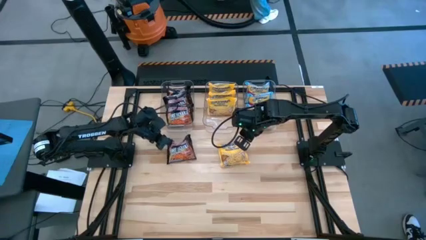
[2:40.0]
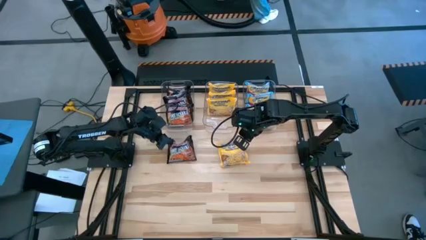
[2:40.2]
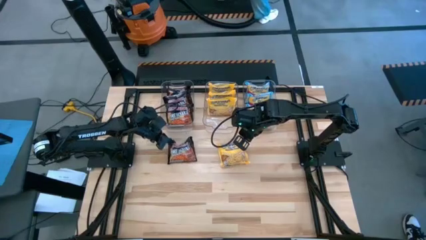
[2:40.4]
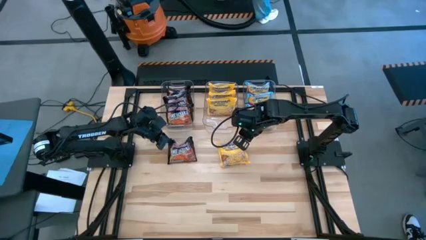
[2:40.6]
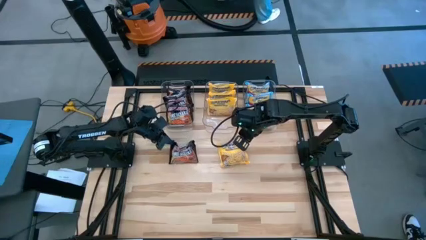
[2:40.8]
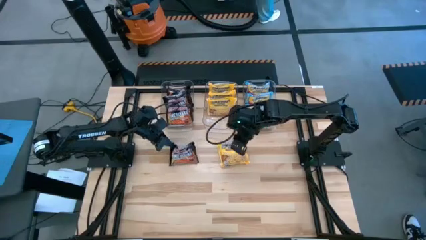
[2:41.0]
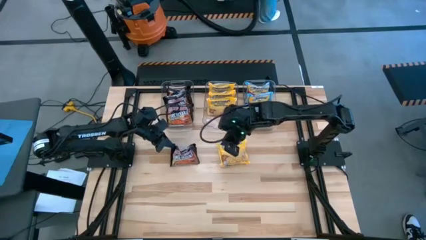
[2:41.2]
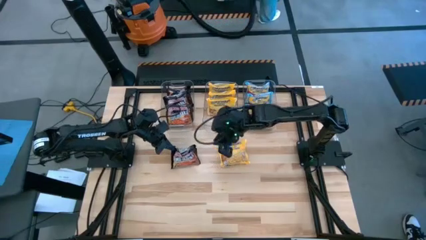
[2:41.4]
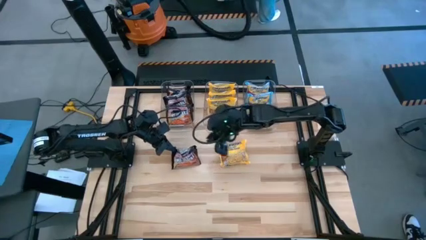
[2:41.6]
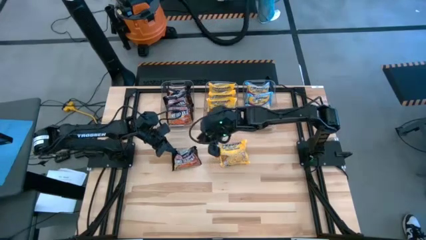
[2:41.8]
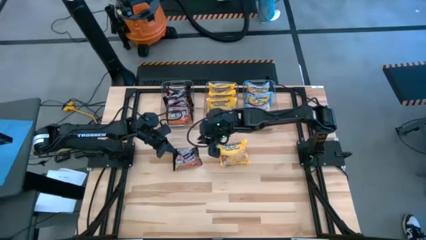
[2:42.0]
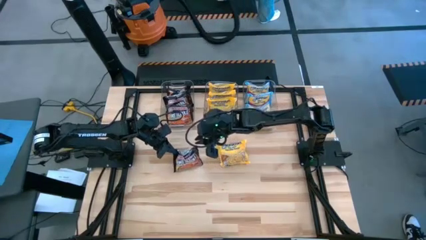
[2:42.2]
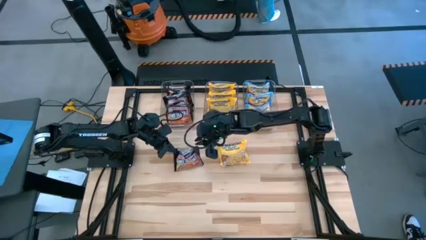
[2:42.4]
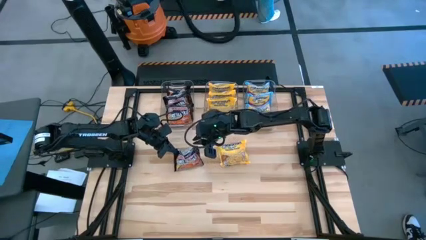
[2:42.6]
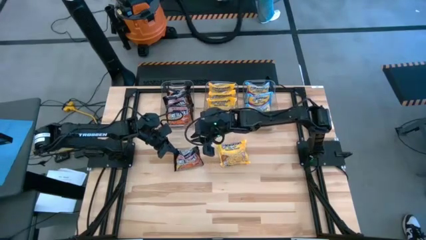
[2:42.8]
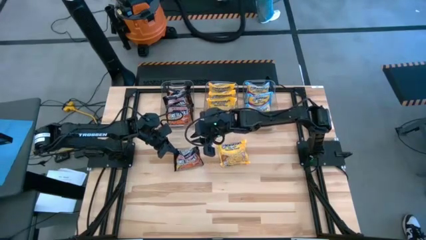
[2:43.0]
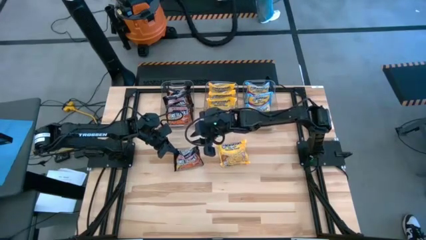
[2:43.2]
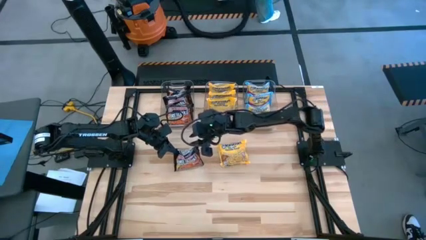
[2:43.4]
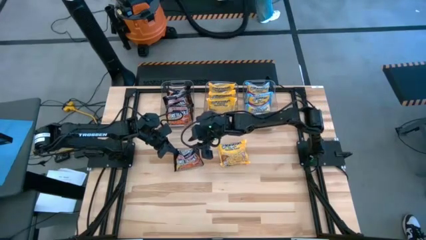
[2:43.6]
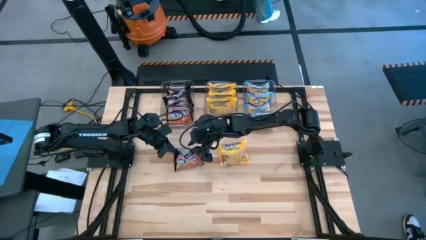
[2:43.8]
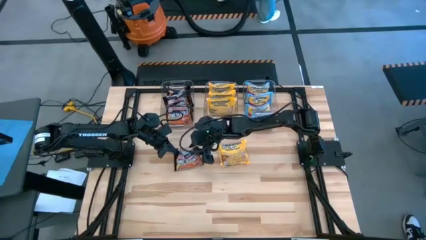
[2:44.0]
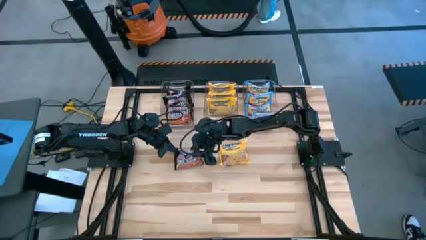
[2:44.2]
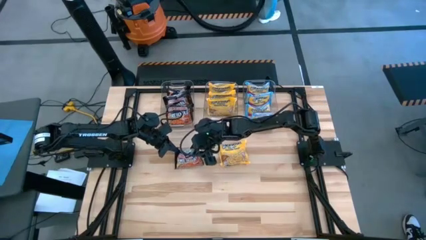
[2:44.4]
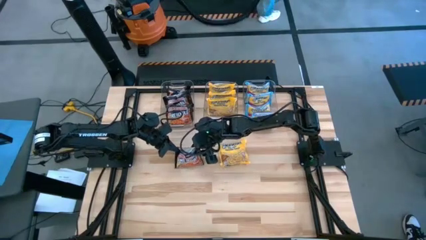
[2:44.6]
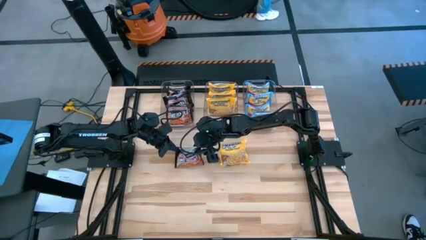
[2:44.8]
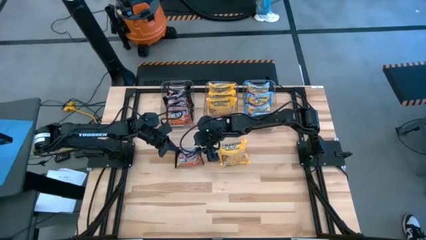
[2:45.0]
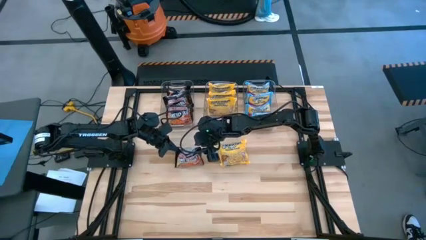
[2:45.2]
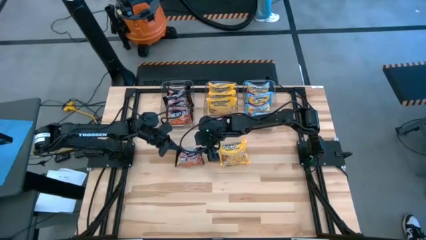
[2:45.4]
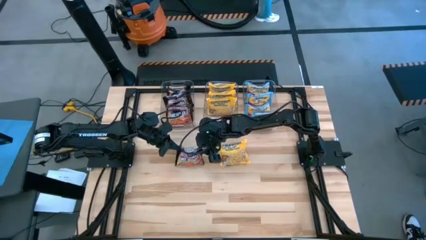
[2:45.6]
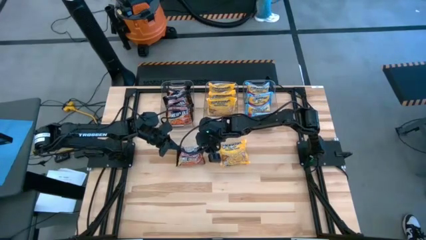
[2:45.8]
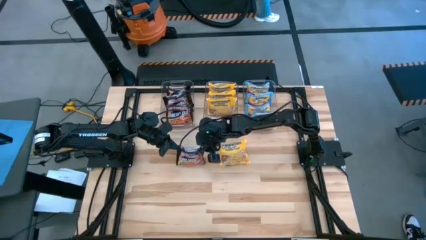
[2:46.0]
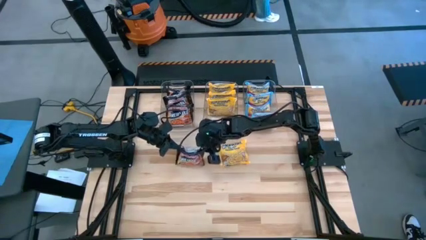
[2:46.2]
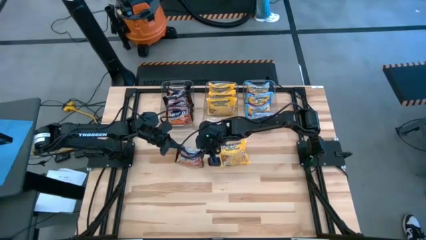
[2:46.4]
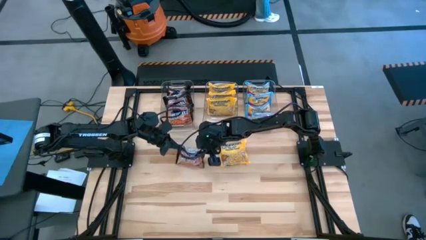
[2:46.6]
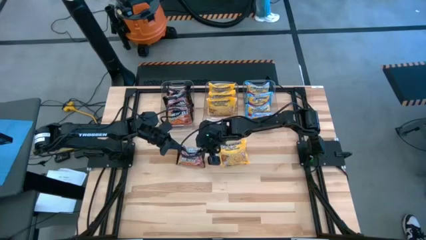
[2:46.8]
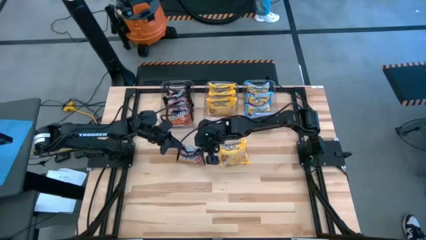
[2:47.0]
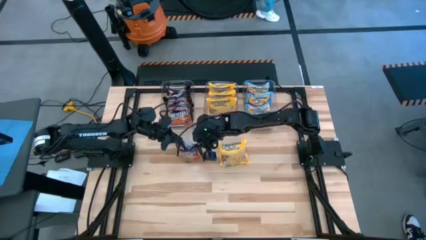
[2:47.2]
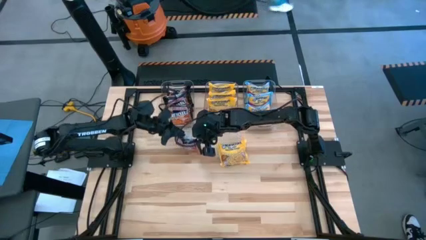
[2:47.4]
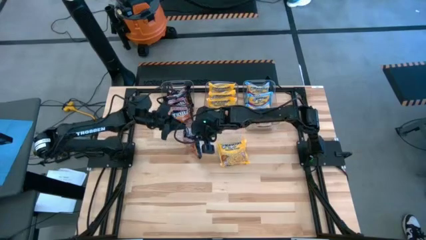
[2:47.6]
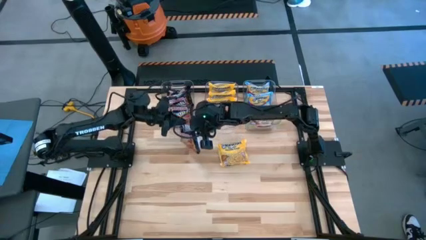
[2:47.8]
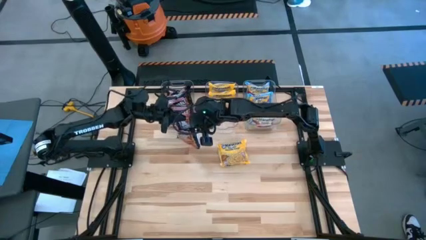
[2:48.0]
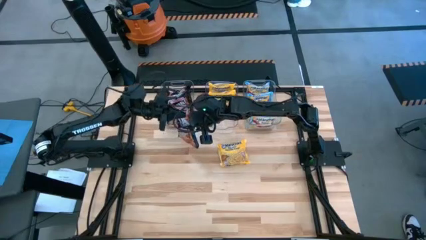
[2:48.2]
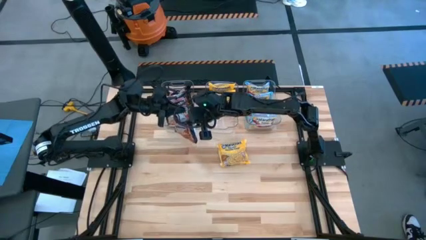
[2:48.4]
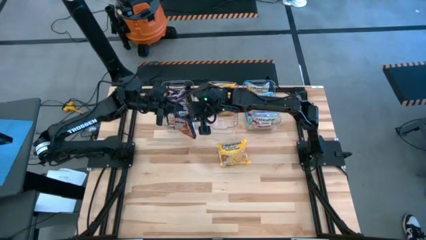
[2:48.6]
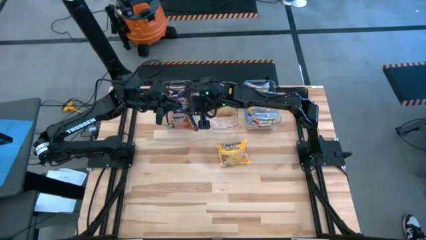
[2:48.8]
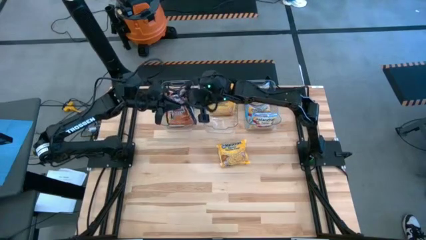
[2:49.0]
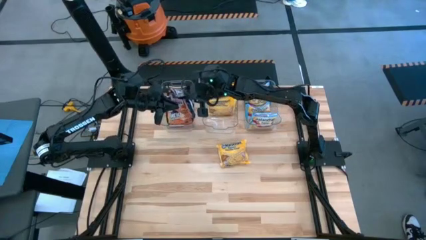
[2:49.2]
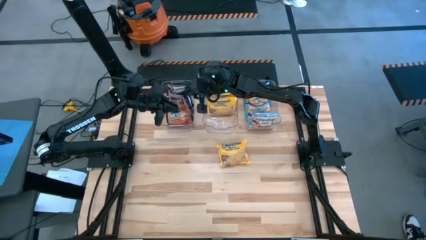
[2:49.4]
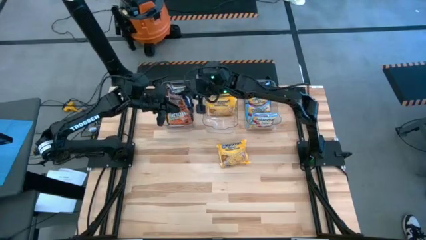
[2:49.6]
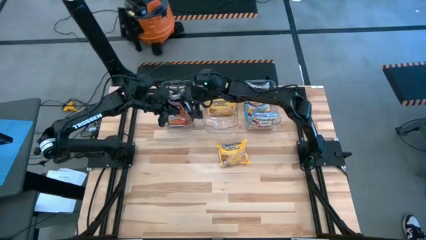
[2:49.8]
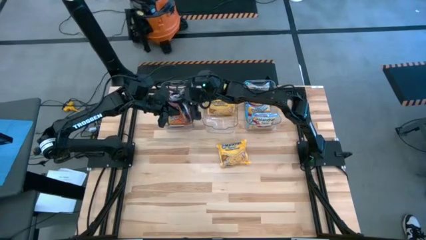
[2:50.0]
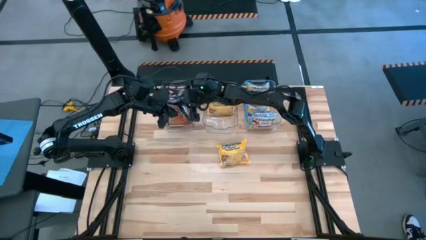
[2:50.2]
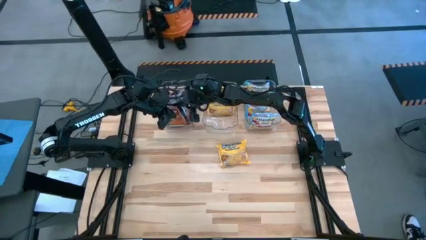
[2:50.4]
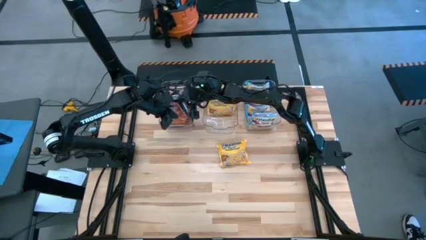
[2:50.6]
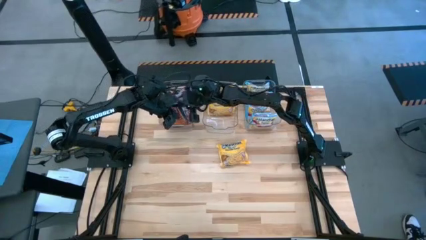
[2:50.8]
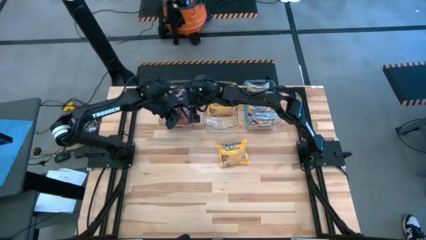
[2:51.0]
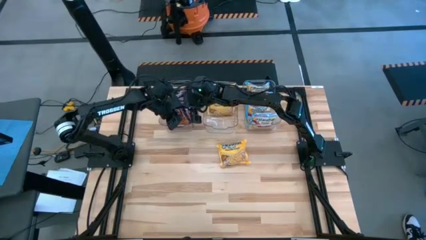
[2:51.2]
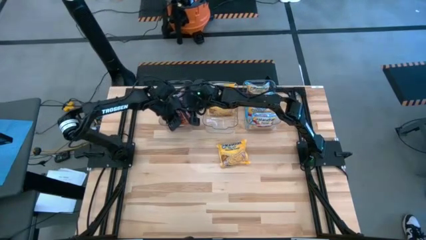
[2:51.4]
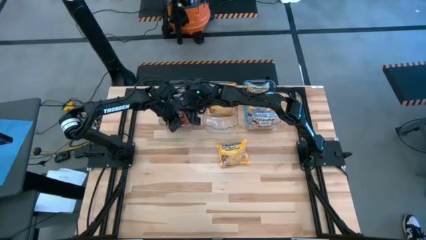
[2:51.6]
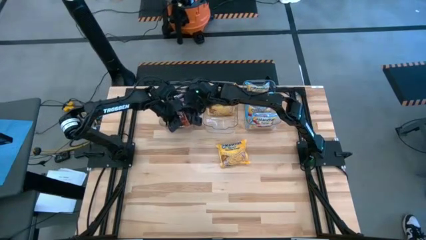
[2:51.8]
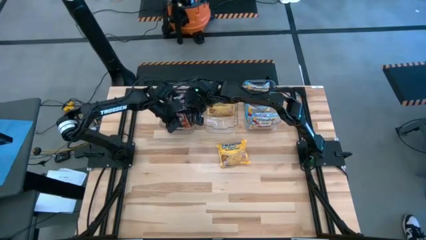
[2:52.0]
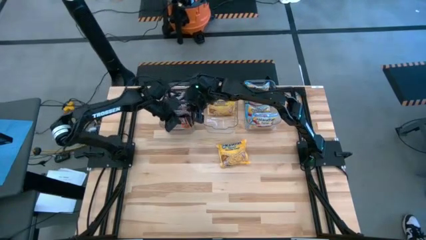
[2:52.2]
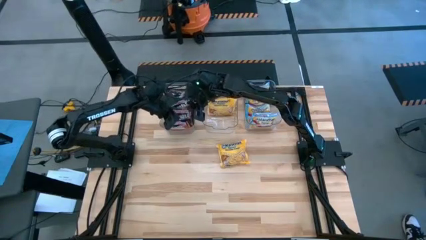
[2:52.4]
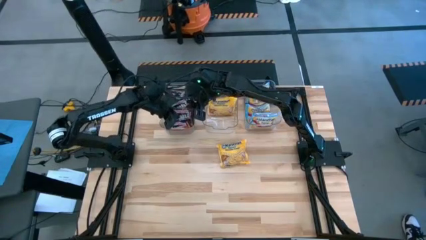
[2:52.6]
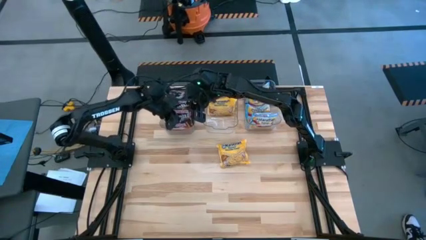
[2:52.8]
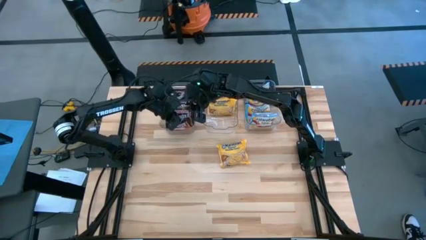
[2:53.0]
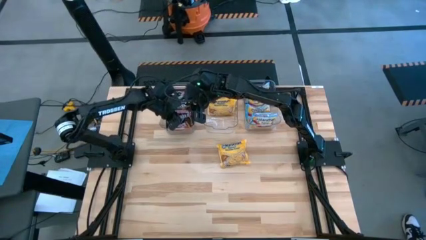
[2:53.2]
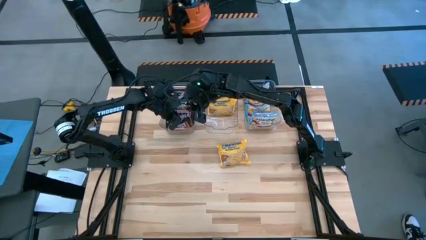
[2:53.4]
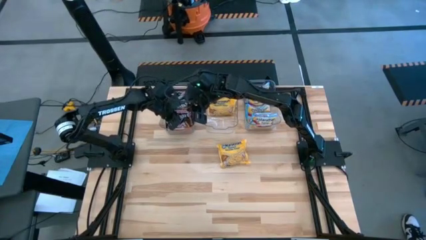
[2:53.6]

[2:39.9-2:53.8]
Task: Sort Maruchan noodles
Put the black noodle pack into the left transparent bin

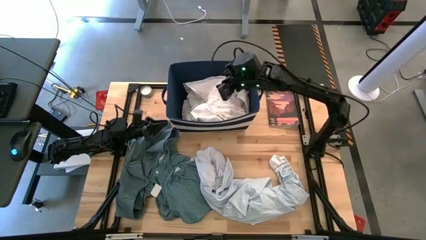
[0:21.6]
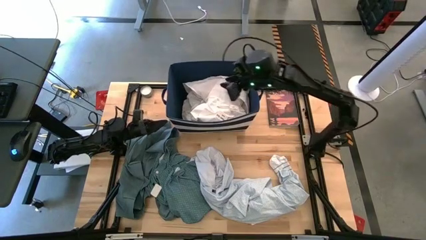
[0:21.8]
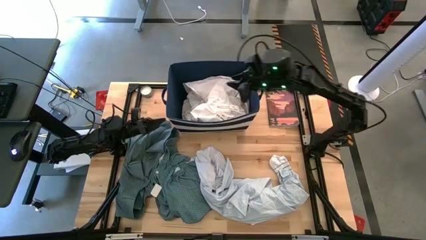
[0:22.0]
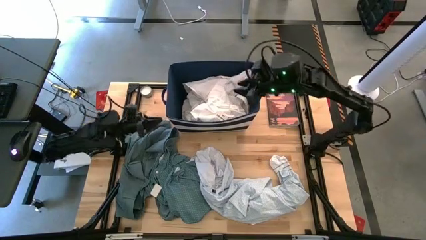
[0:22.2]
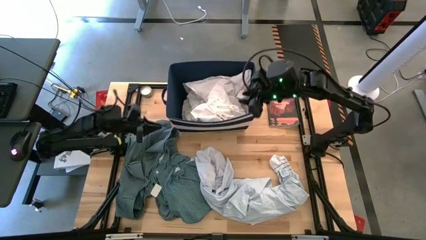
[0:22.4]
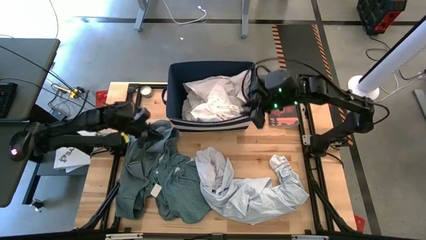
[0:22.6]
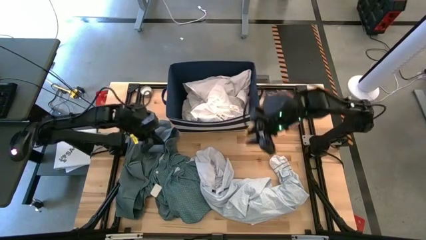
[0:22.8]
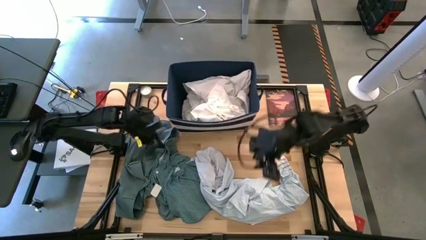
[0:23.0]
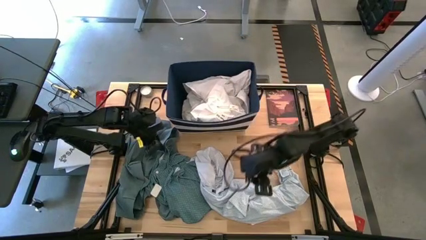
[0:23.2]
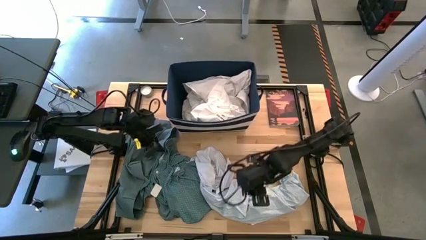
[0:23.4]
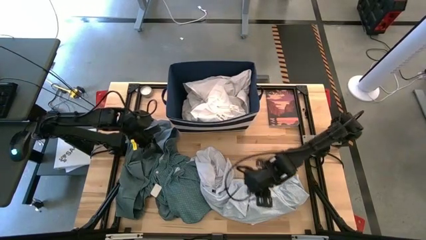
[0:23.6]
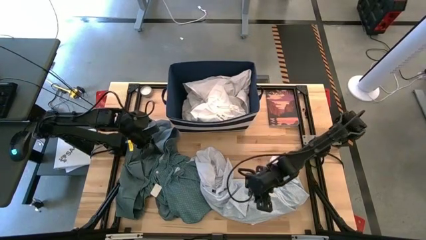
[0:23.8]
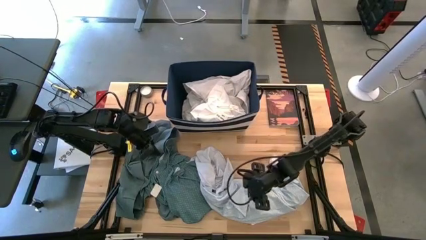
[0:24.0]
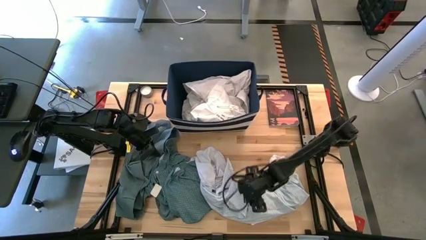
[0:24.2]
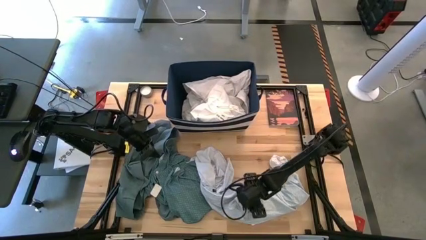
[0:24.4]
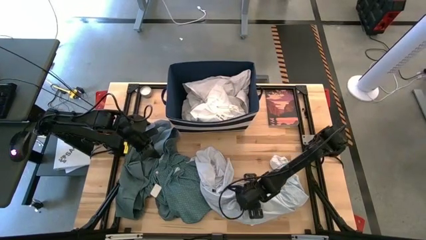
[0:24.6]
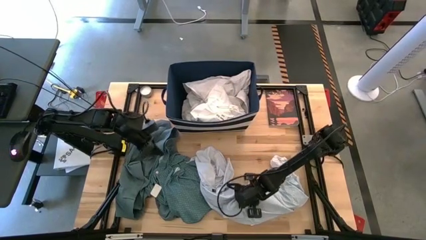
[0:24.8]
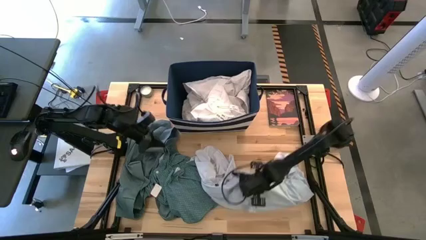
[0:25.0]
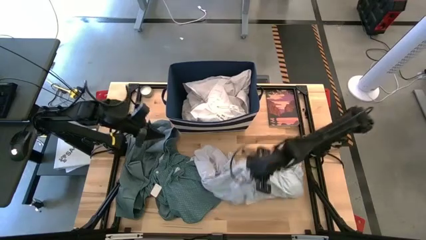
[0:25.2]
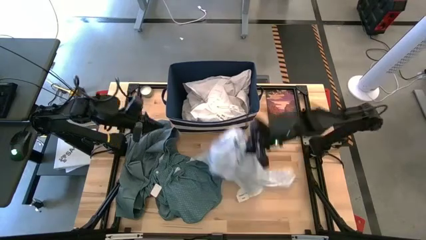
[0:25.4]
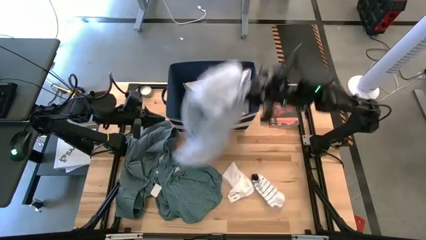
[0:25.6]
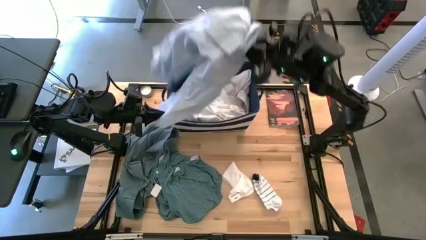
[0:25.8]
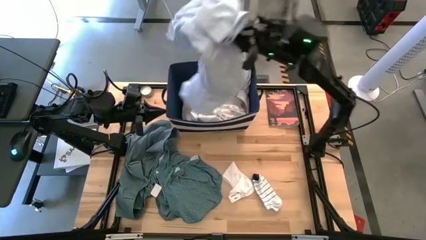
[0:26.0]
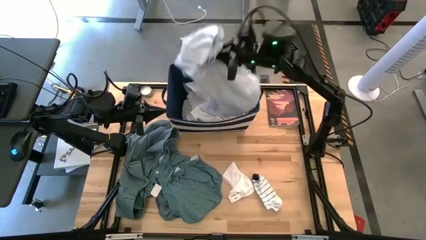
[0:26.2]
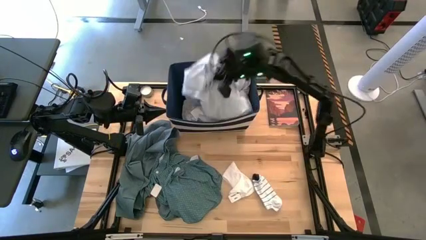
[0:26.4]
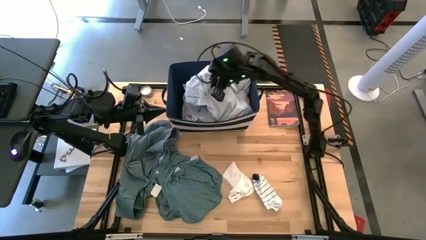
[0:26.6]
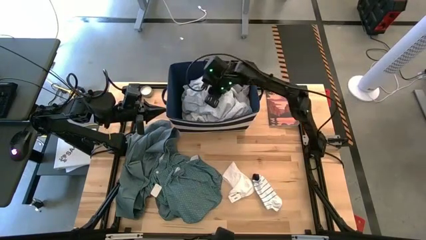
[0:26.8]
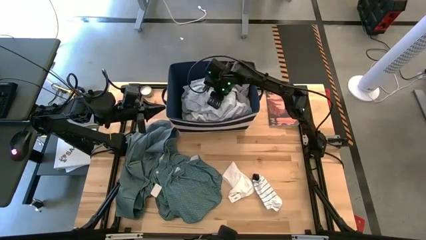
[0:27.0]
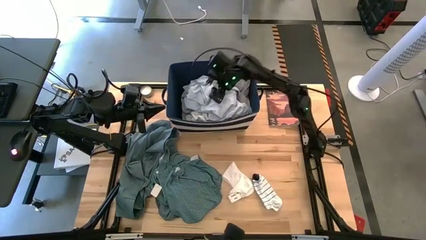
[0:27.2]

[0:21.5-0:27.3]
Task: Sort clothes
Put the light blue polo into the blue bin
